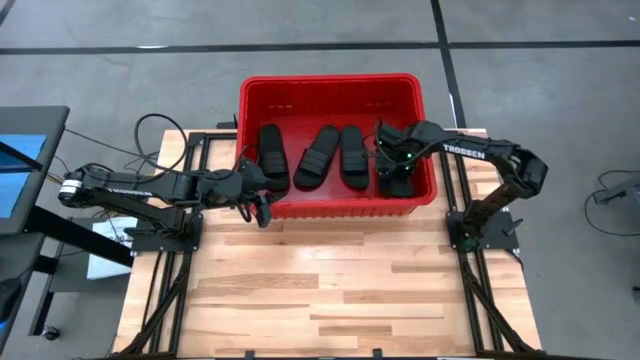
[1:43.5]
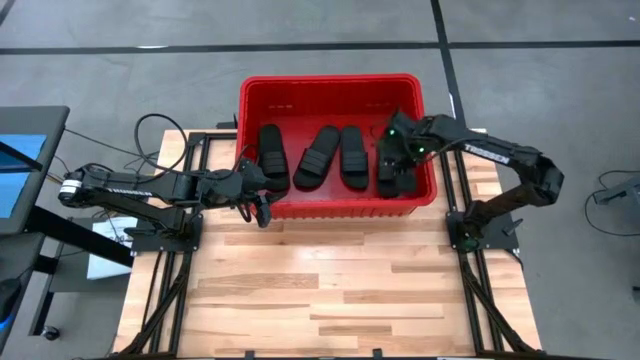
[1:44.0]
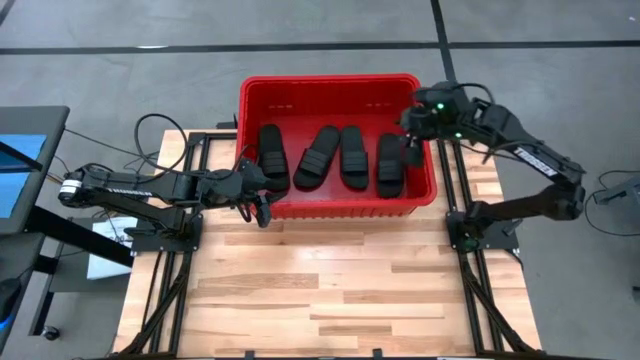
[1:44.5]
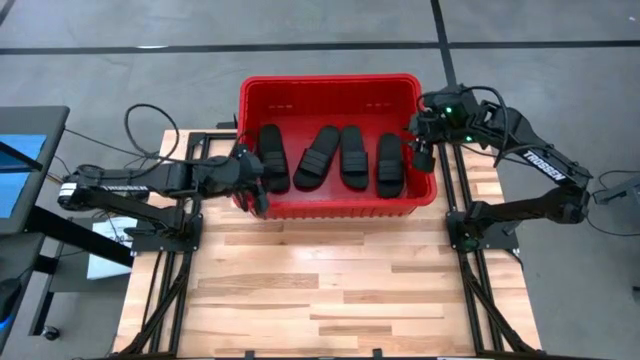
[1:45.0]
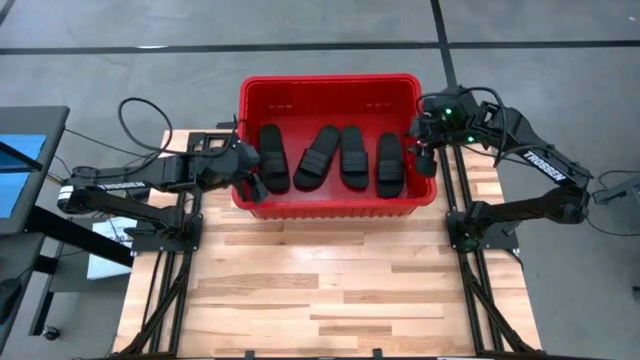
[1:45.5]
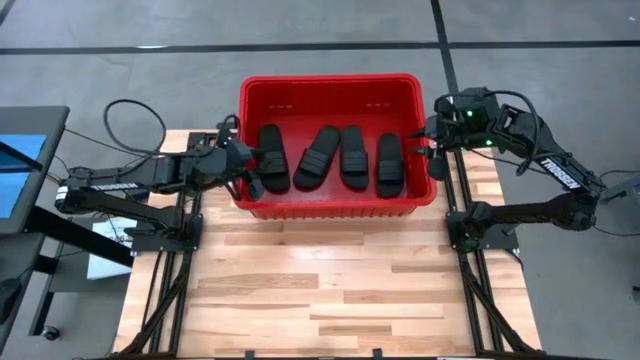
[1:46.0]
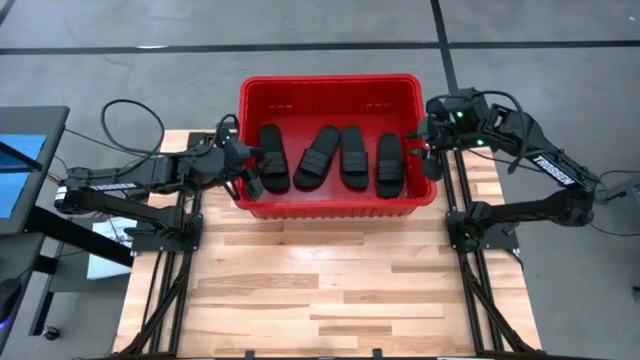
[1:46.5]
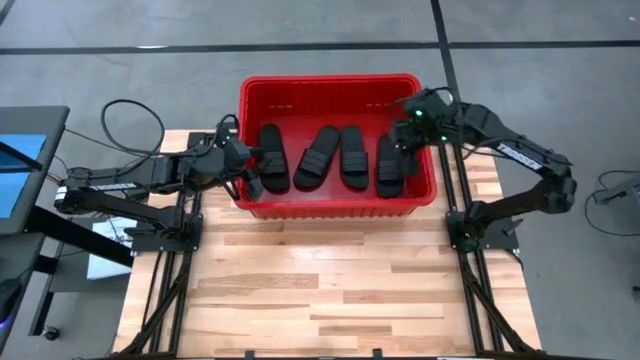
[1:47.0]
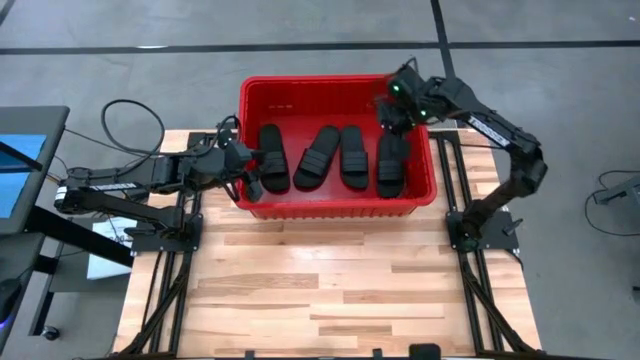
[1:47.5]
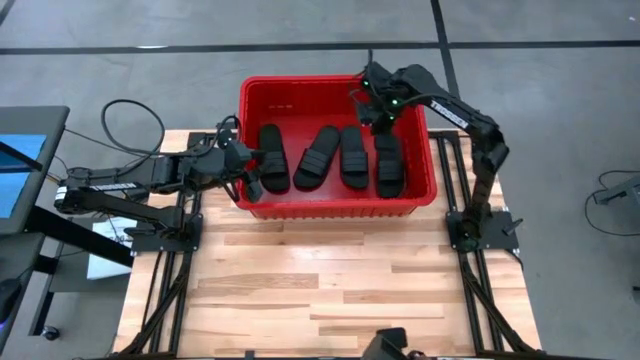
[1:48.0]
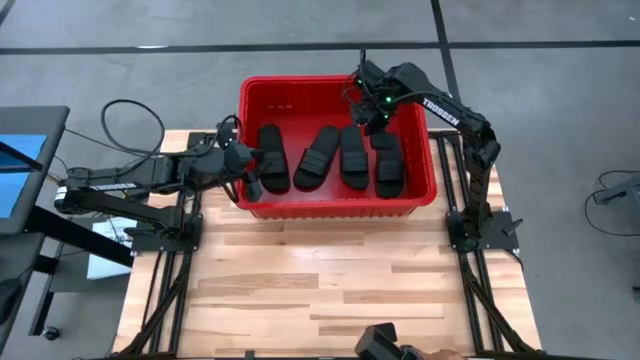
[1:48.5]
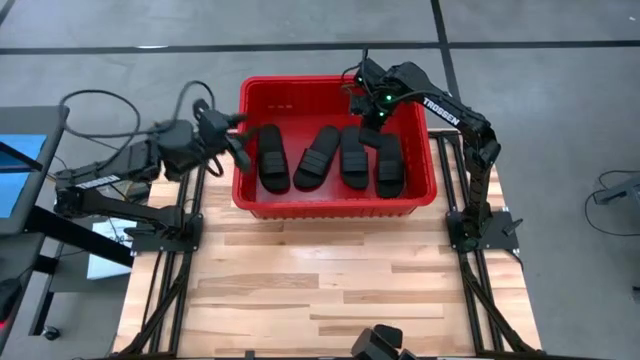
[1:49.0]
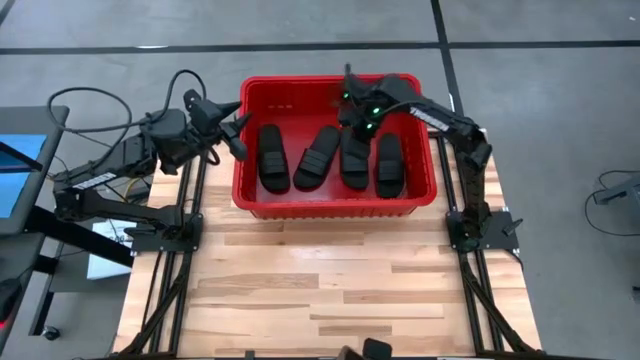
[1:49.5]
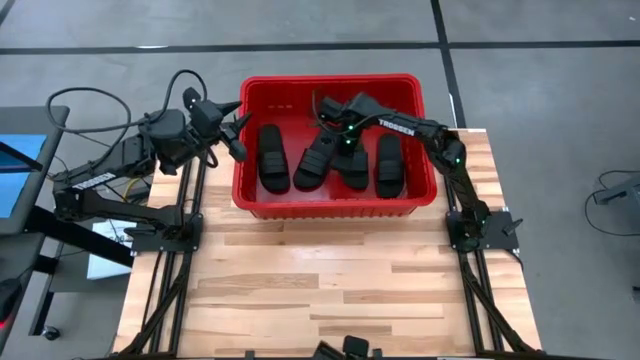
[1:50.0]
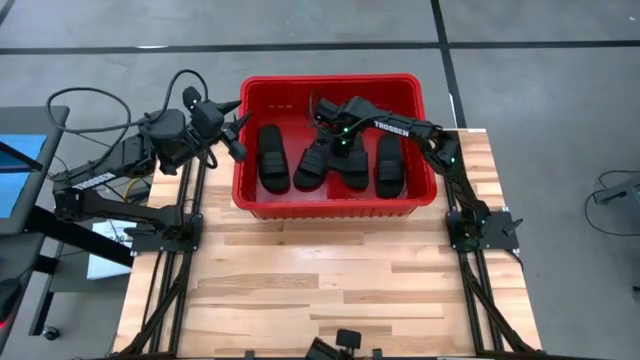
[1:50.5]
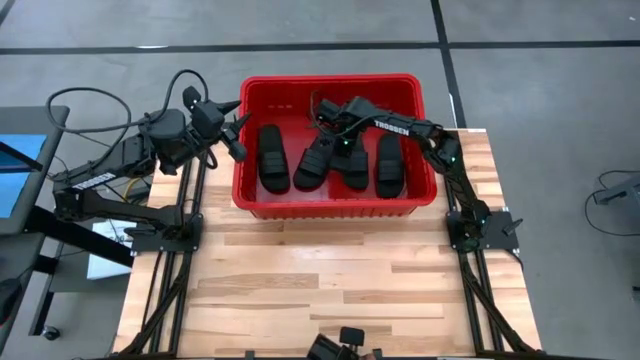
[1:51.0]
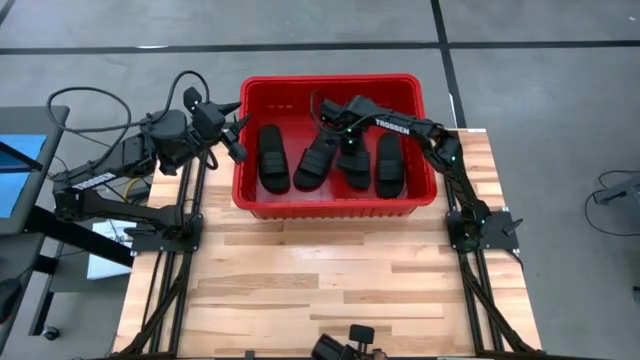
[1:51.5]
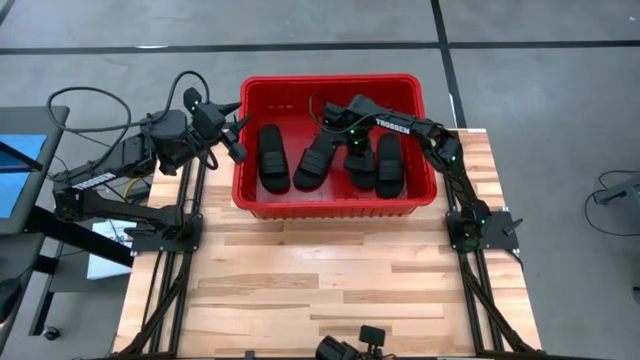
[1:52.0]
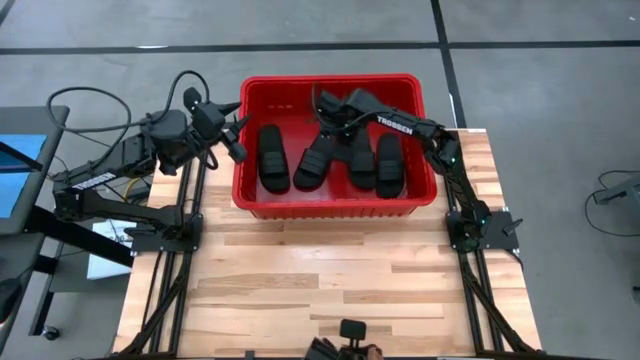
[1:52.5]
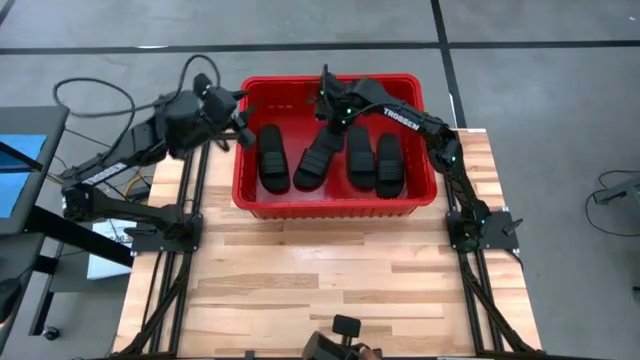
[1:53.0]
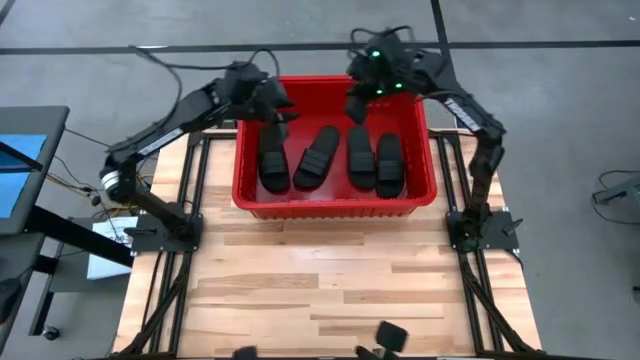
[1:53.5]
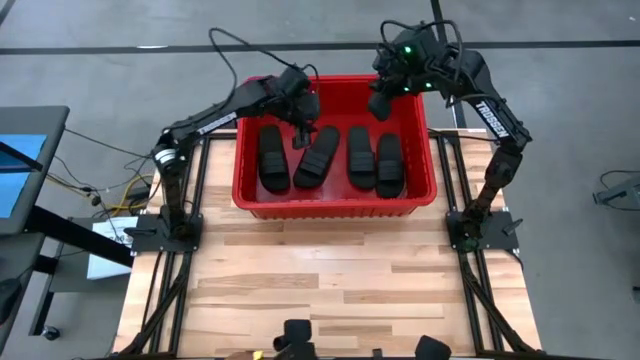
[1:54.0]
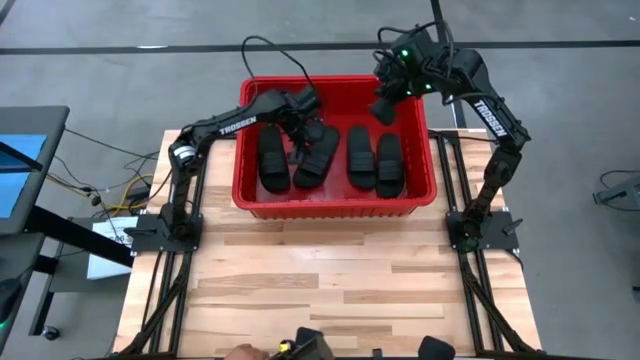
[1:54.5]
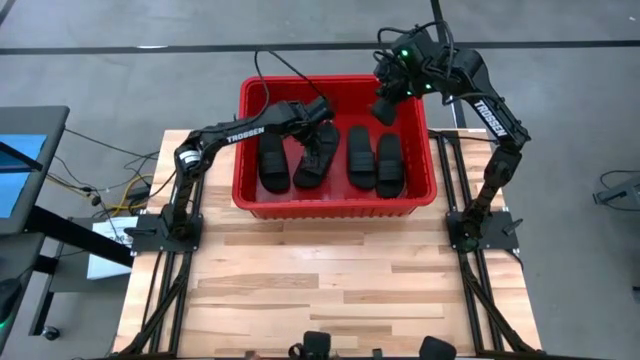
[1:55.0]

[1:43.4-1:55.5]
Task: Pick and place slides into bin
Adjust the black slippers in the red bin

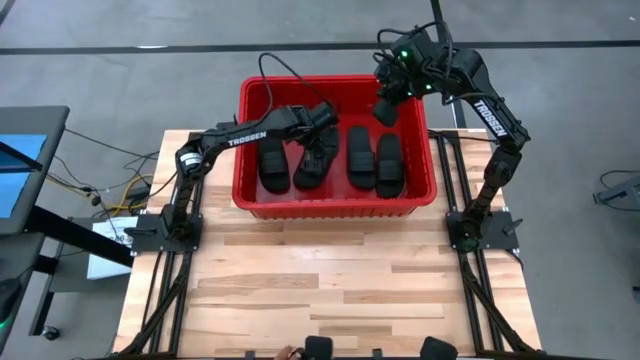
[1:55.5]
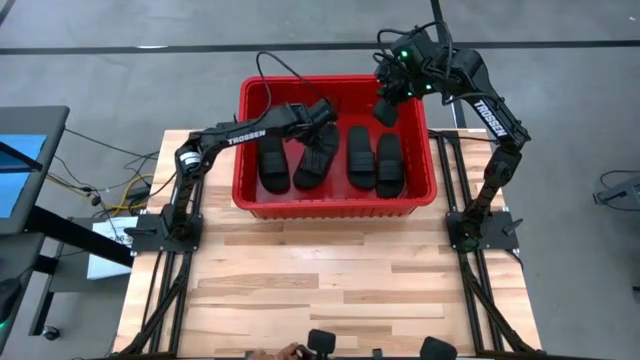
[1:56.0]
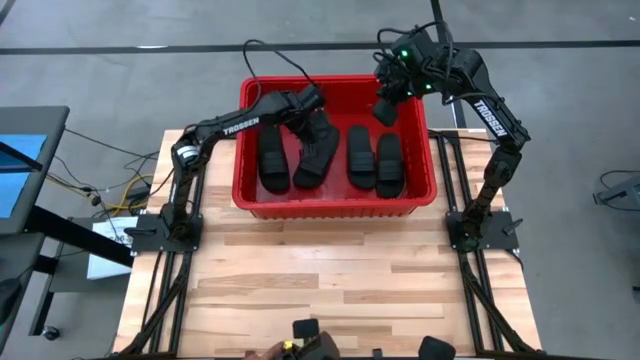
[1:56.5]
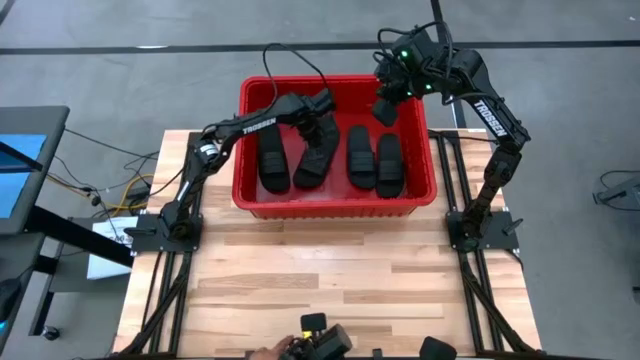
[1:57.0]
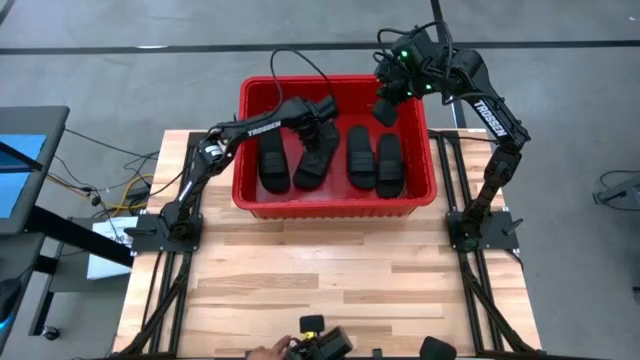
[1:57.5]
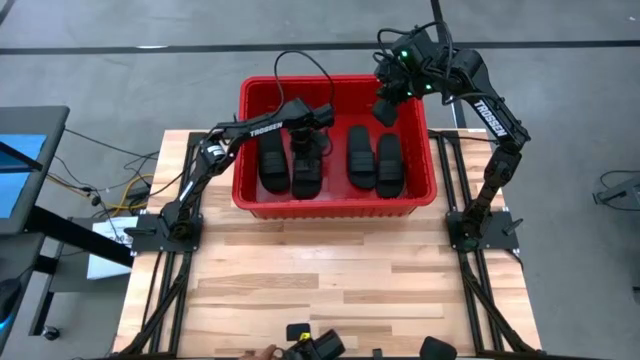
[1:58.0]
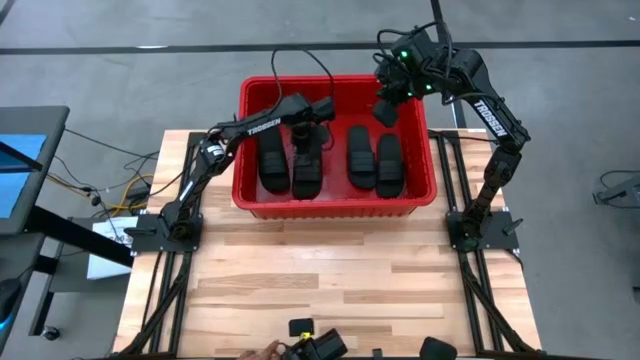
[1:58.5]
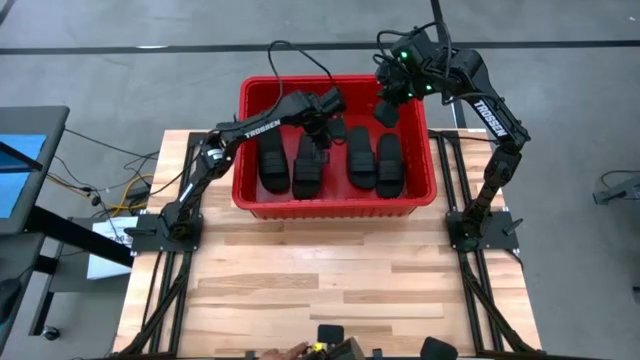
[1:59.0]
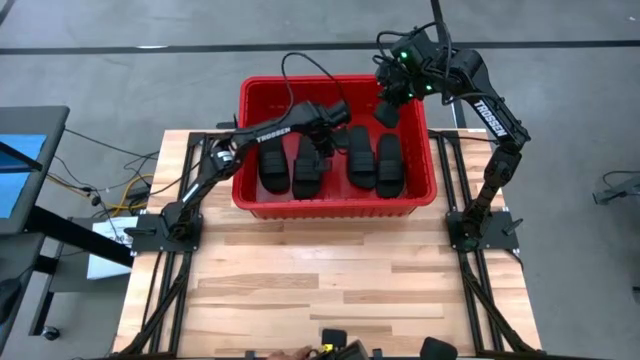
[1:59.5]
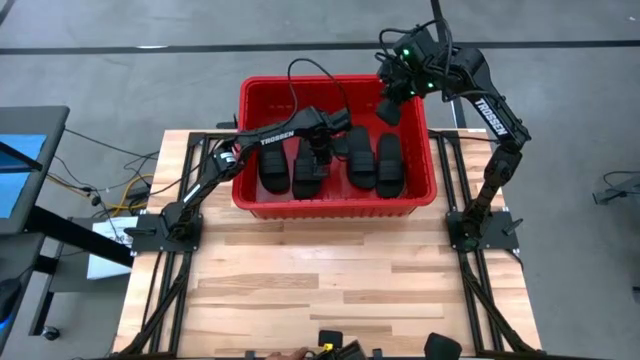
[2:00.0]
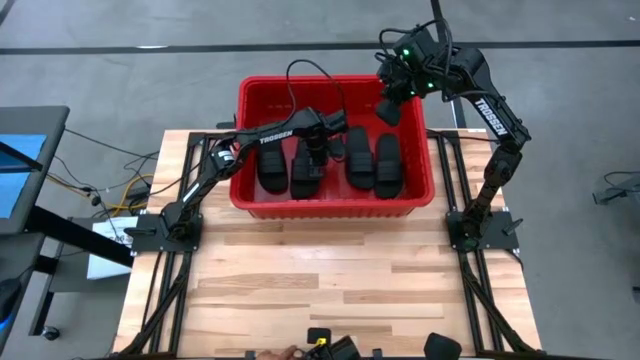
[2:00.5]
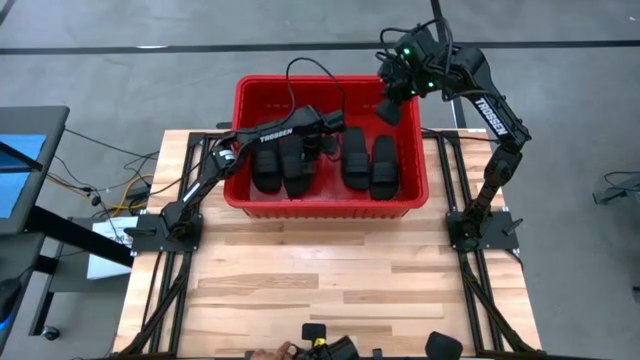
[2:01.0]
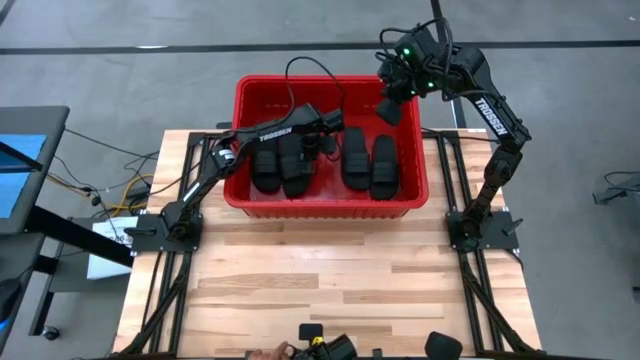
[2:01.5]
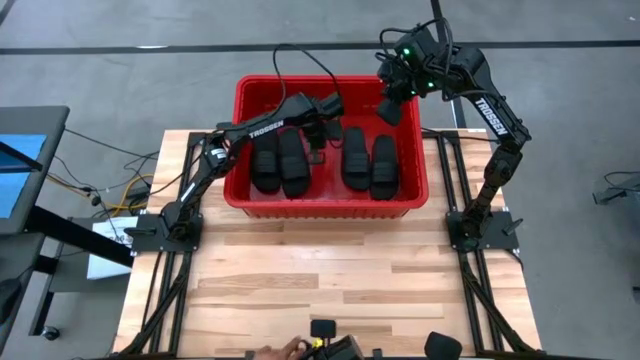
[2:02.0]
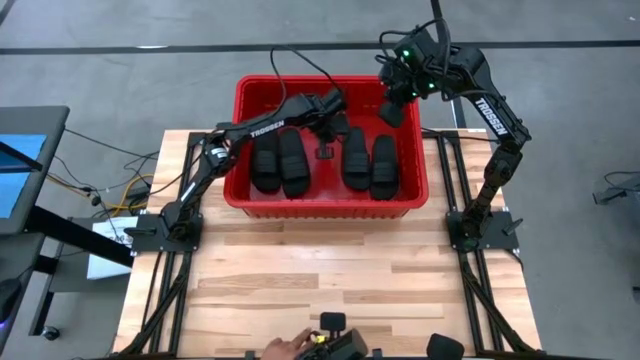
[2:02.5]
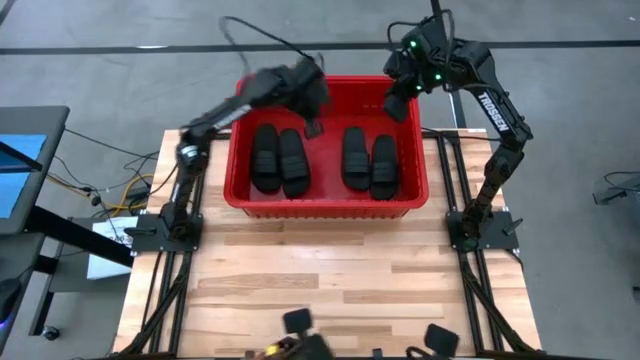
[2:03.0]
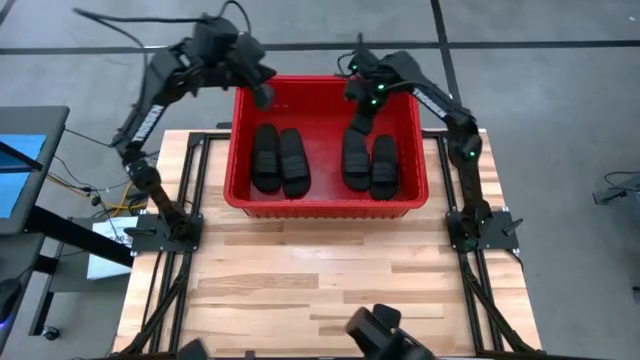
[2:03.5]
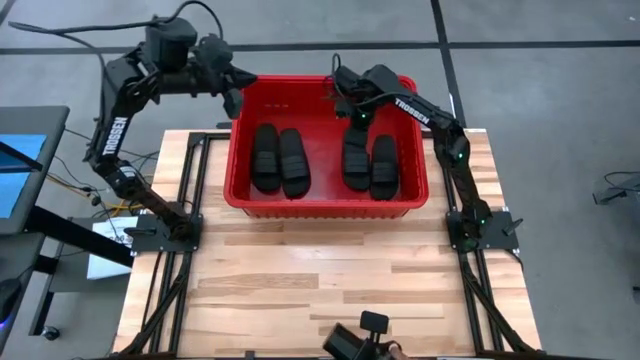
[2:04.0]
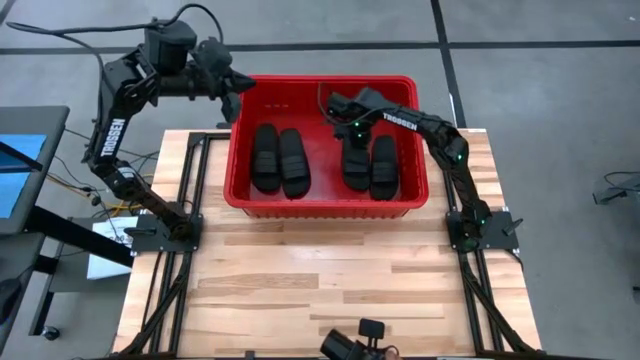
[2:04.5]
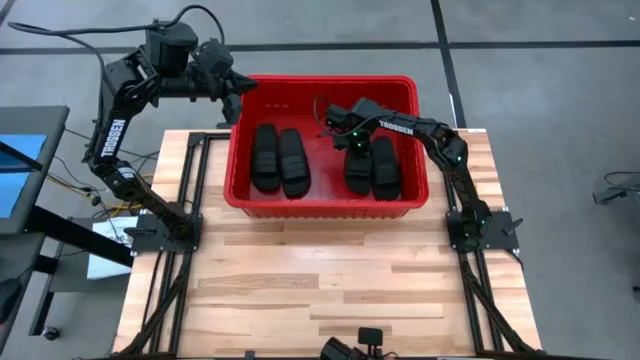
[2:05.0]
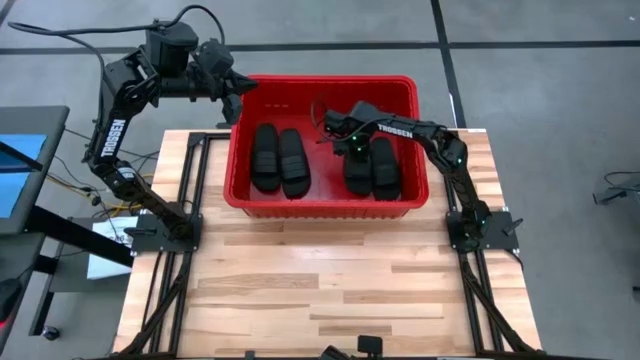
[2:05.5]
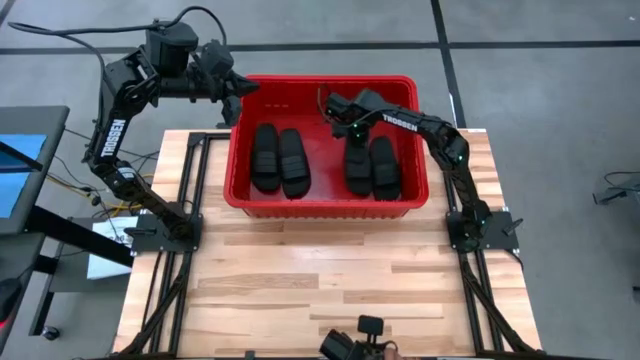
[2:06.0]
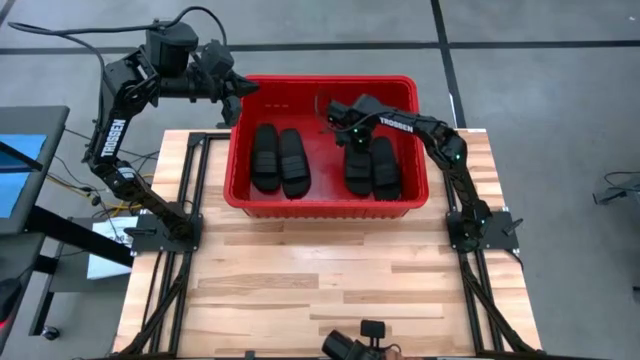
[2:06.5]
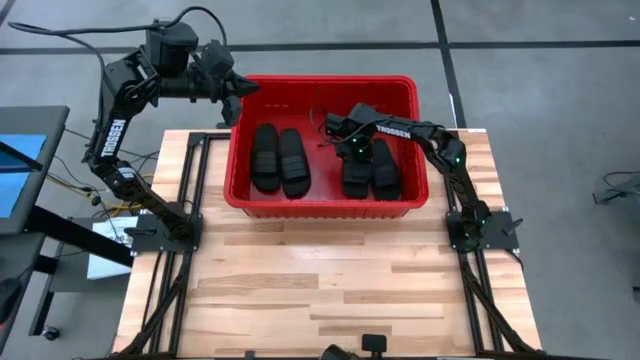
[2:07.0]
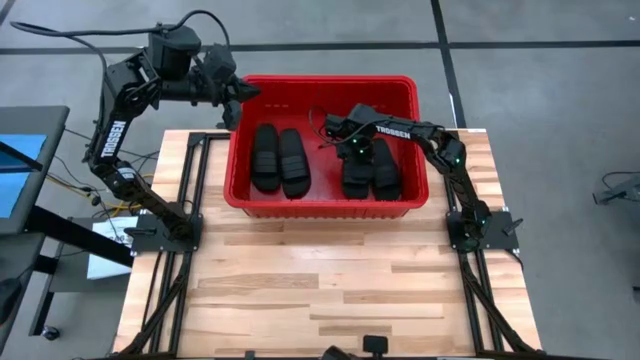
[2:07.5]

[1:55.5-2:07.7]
Adjust the black slippers in the red bin
